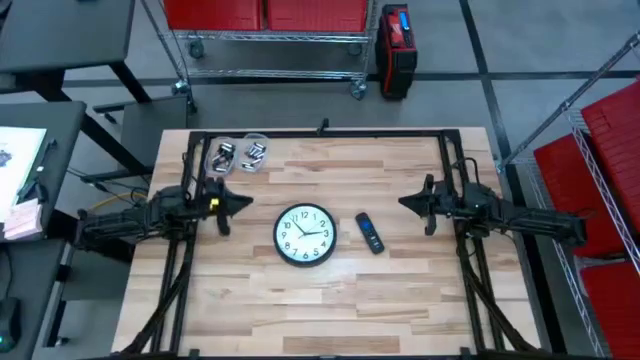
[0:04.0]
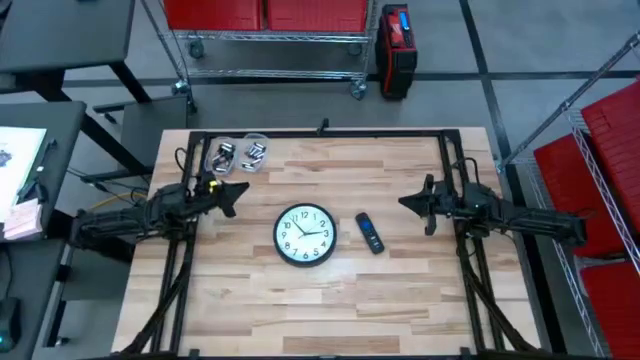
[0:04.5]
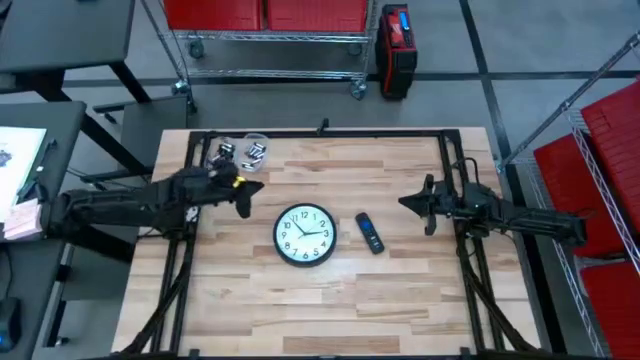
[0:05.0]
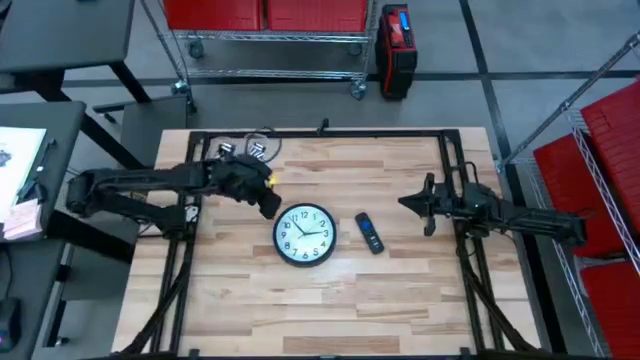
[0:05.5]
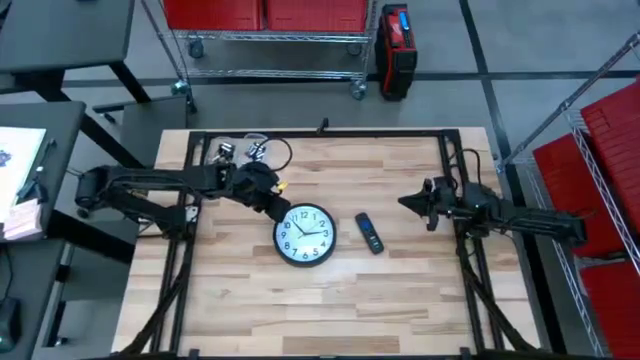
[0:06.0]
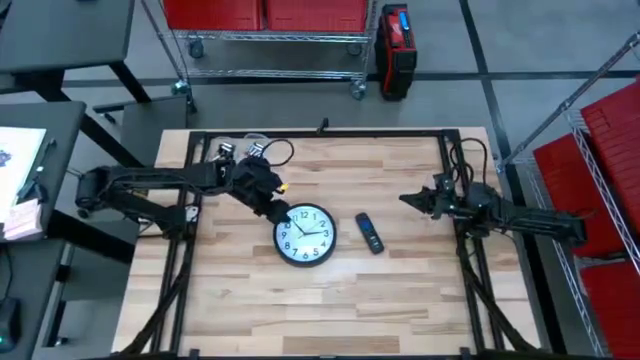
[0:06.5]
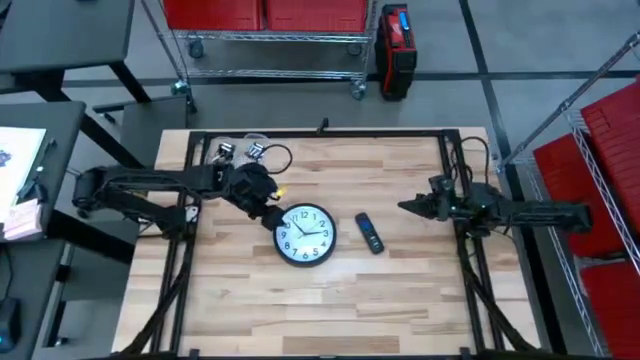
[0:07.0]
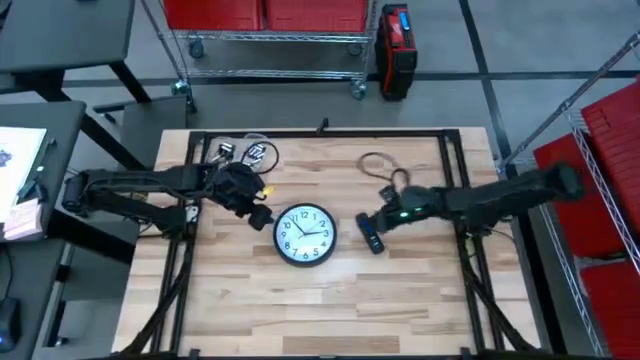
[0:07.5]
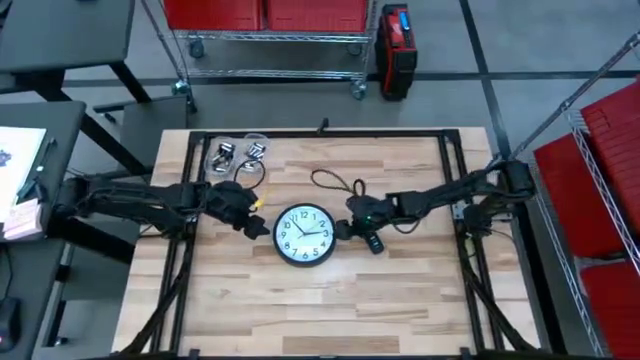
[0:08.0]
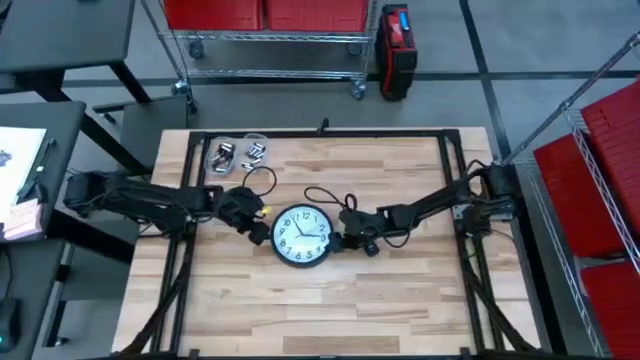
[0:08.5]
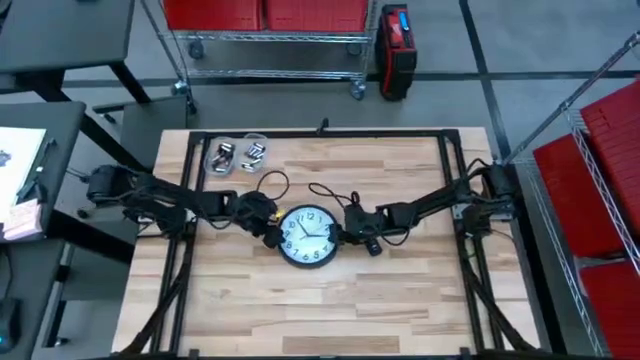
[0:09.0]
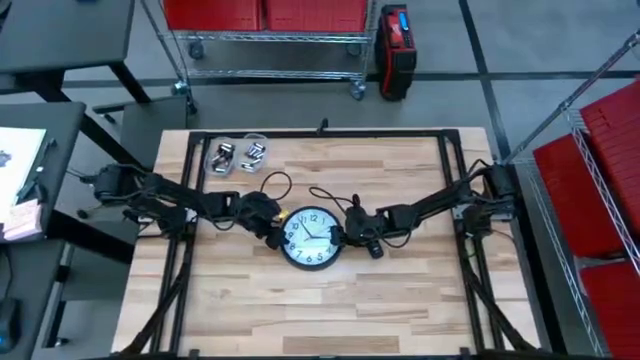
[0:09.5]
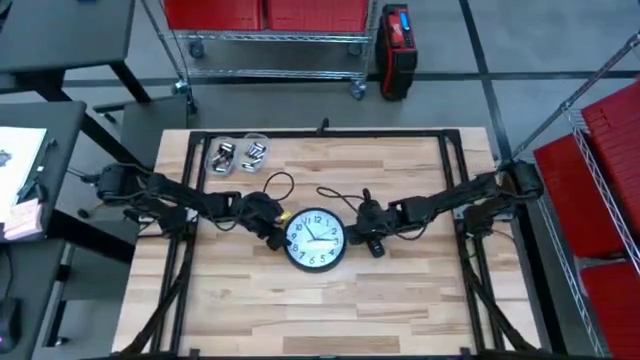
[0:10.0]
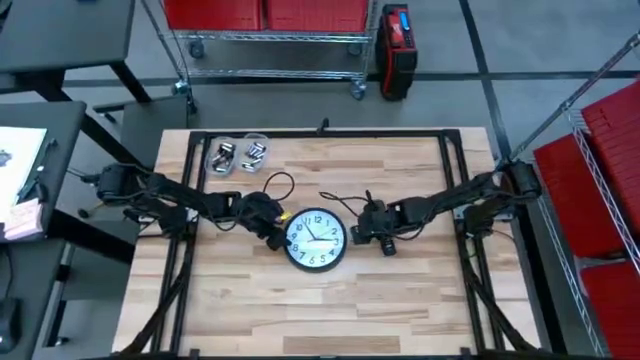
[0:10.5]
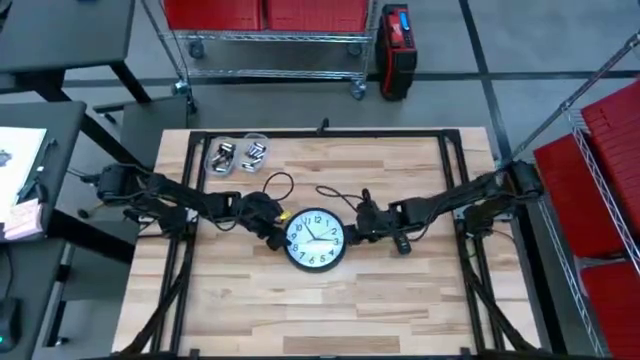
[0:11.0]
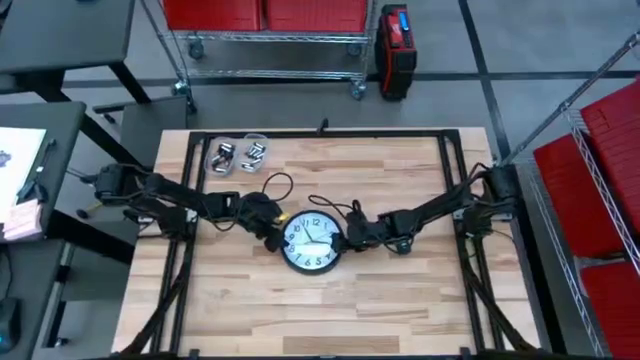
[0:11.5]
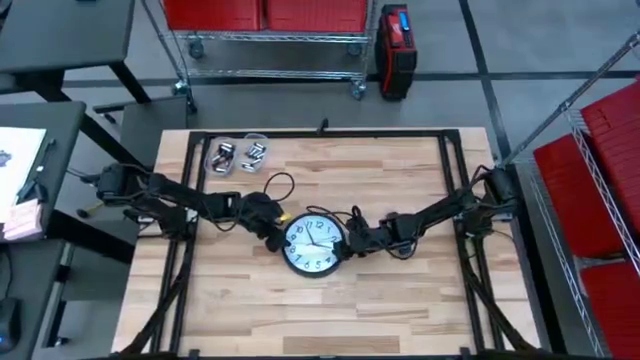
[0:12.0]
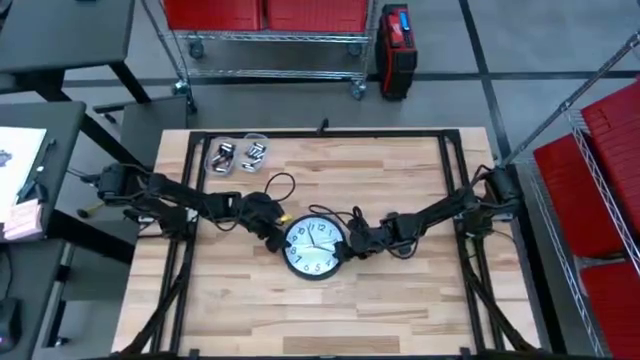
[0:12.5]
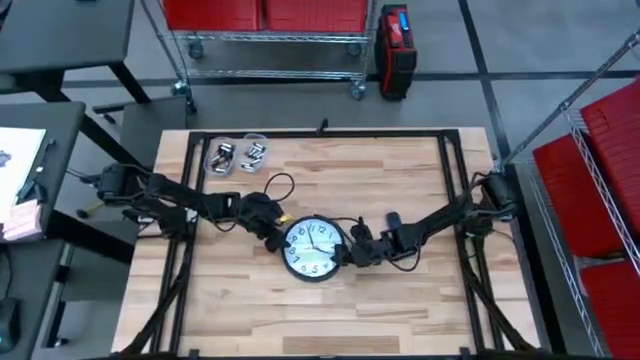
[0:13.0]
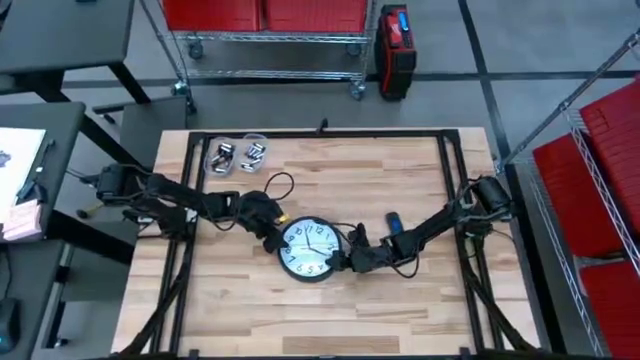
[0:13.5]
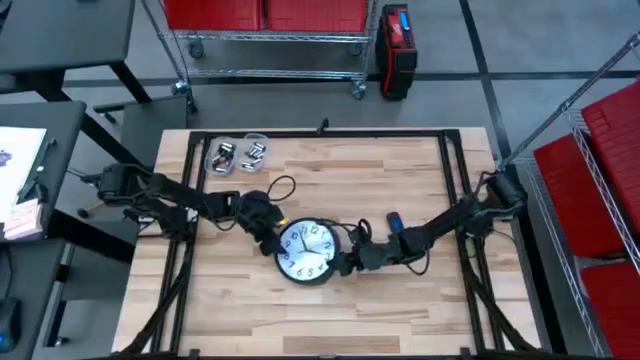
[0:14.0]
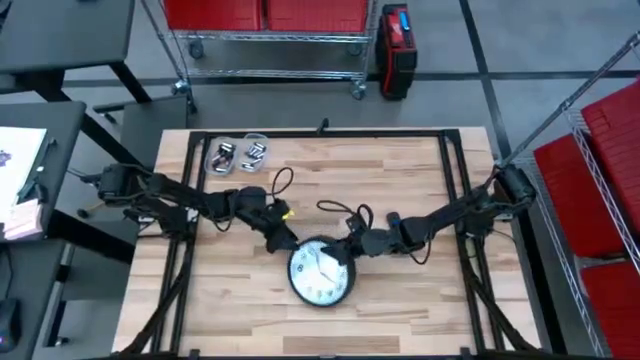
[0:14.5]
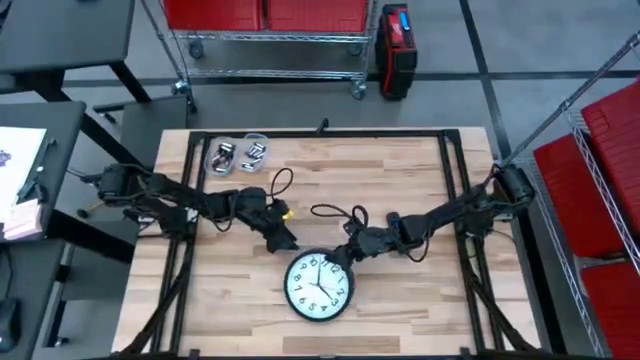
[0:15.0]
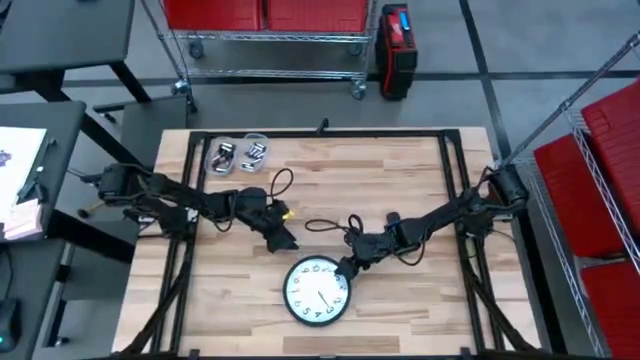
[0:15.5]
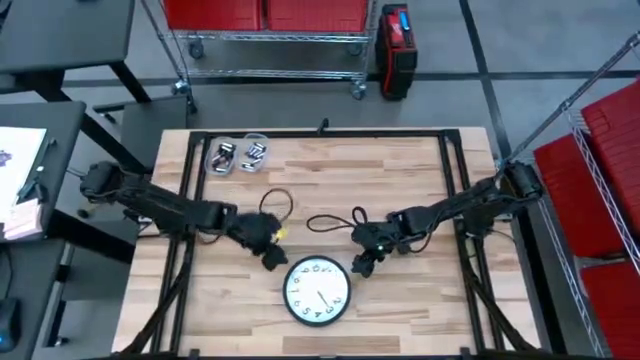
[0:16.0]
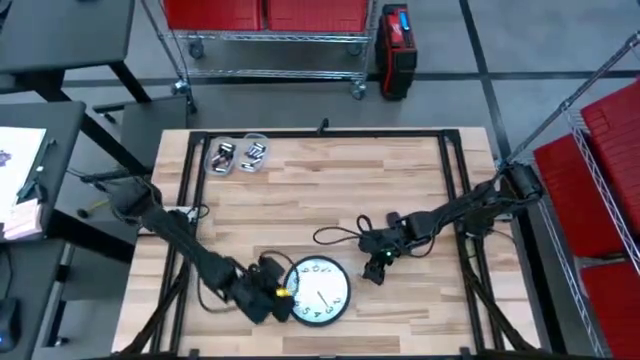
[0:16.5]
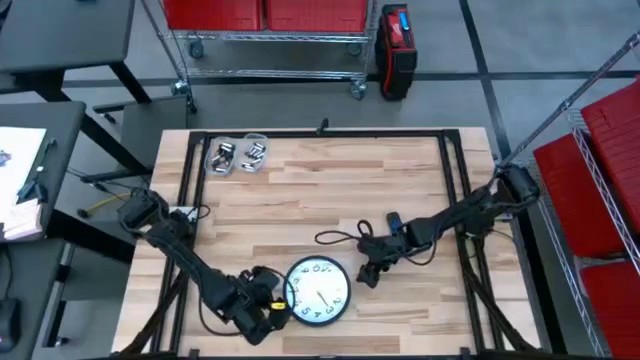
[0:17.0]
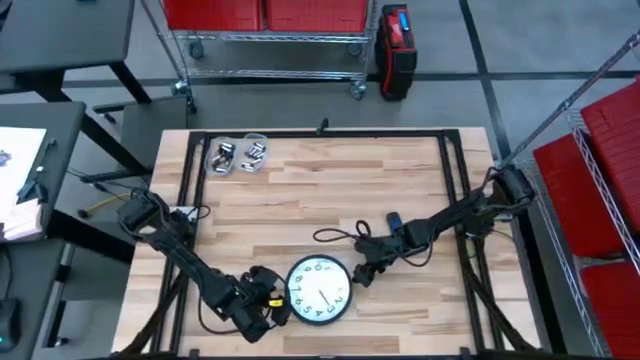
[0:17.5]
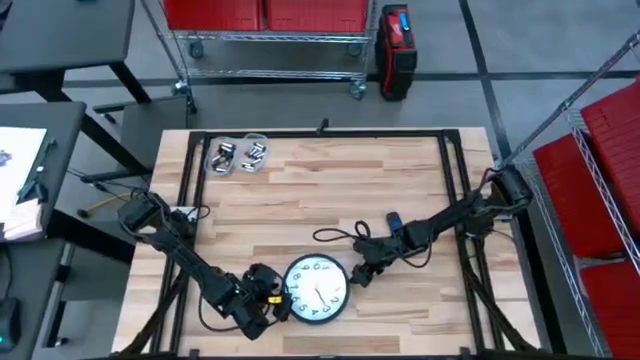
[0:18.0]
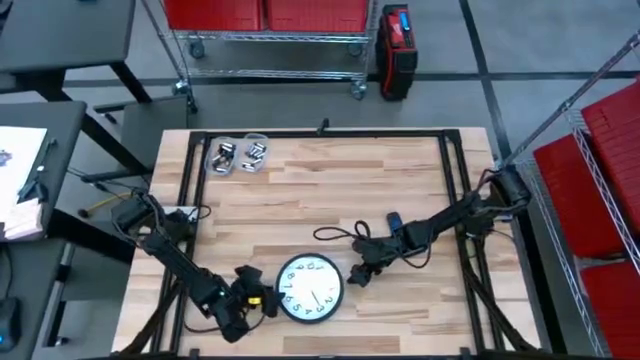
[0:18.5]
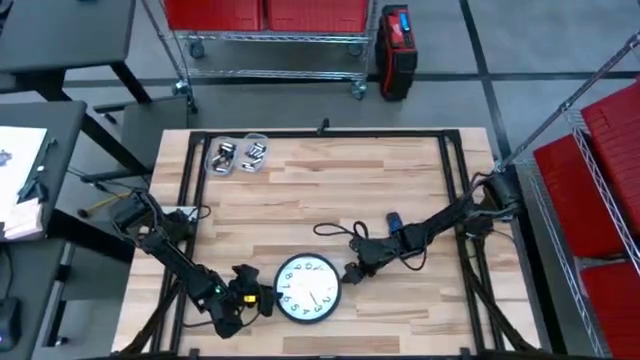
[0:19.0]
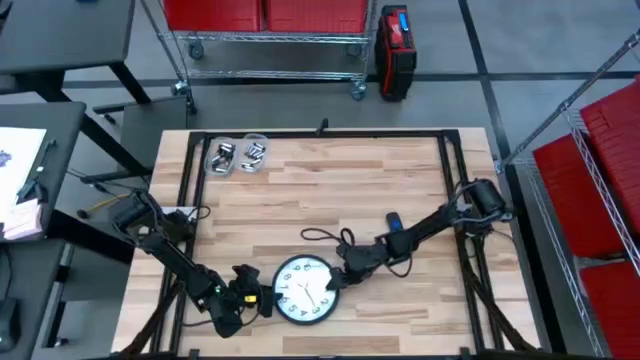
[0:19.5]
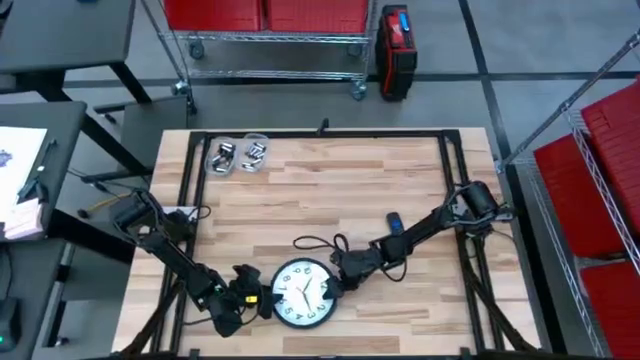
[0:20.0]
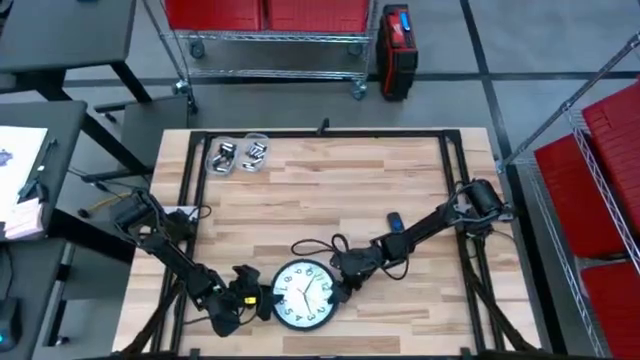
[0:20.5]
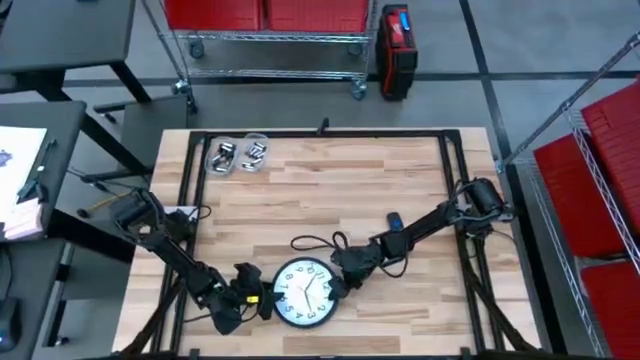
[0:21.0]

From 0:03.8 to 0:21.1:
Task: Insert battery
Insert the silver battery into the wall clock battery compartment

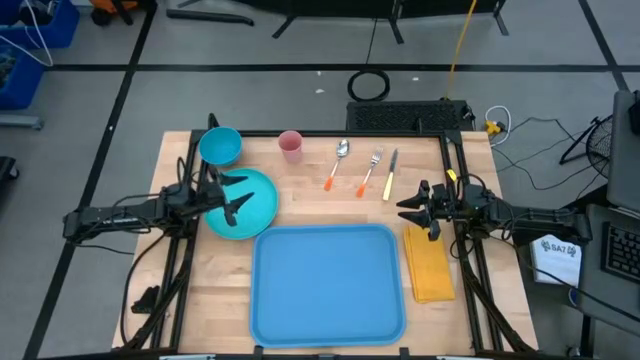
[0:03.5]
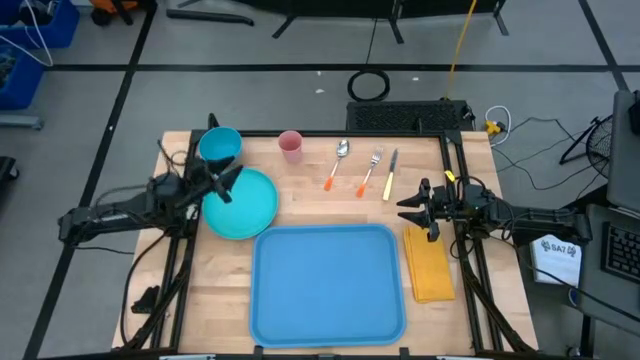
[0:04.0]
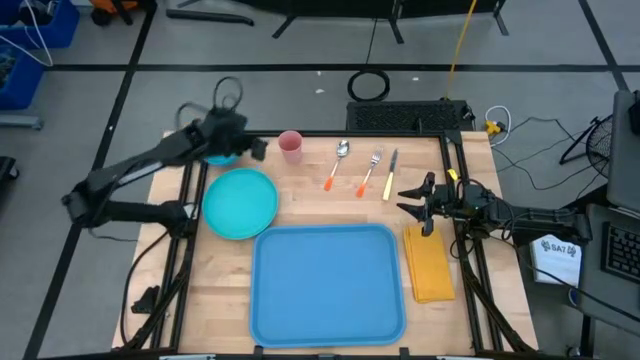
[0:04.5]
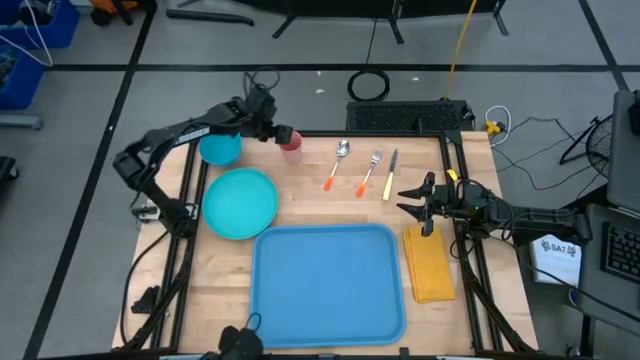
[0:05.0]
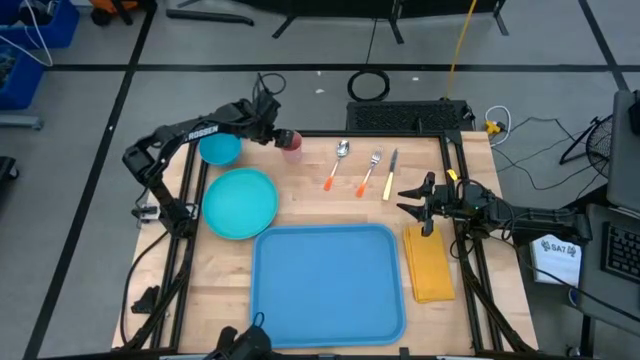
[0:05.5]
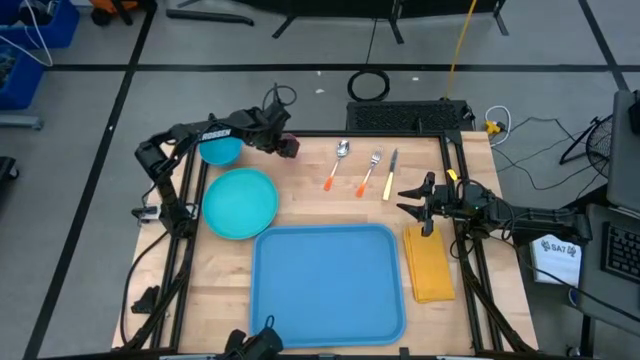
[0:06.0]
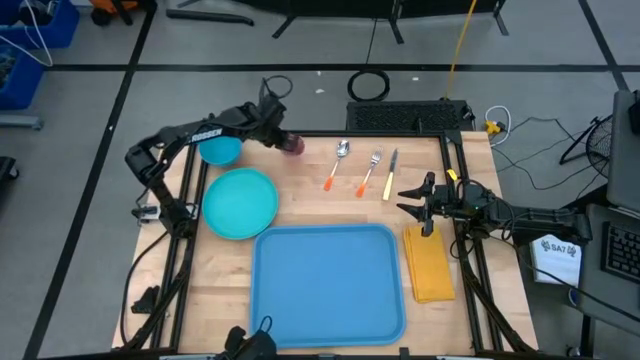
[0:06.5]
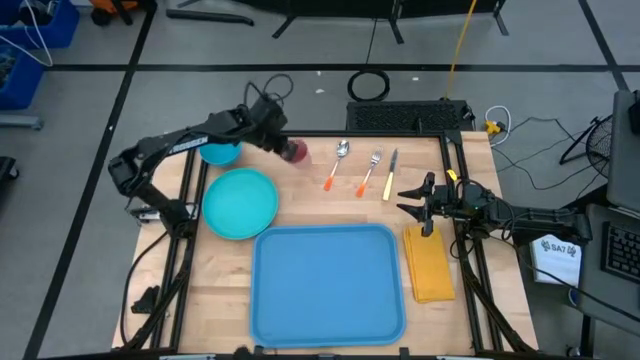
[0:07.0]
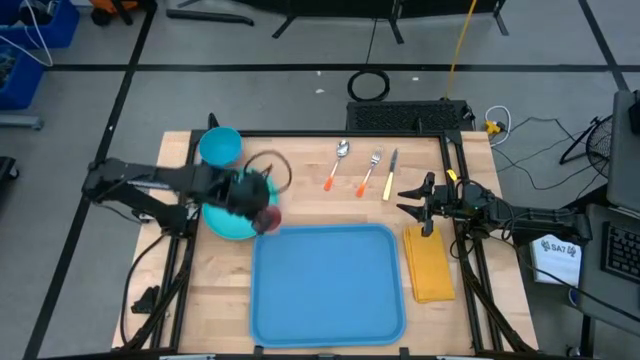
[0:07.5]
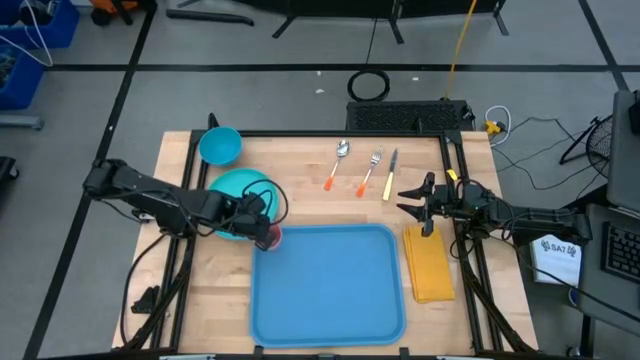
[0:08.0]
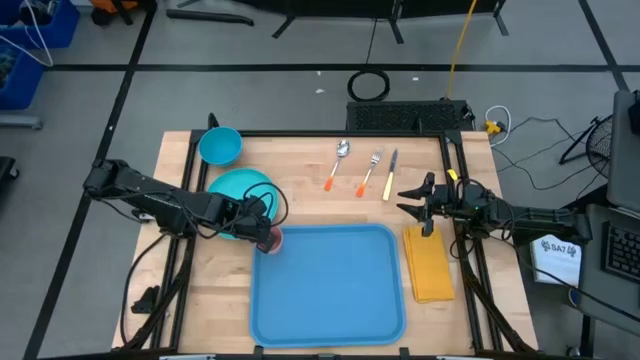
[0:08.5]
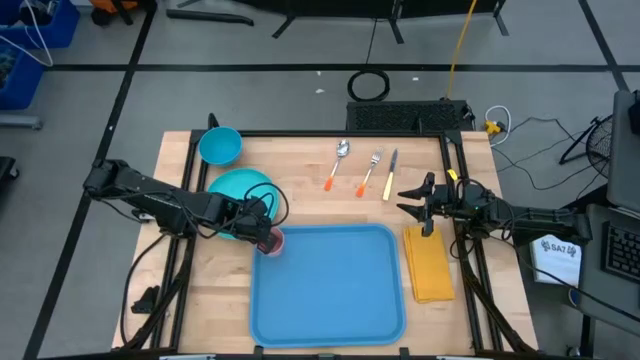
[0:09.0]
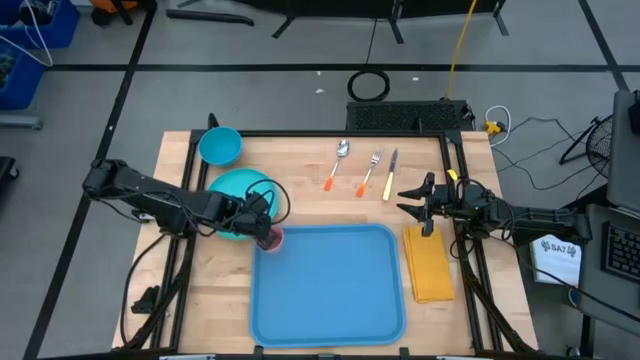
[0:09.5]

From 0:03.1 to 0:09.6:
Task: Set up tray
Put the pink cup on the blue tray
